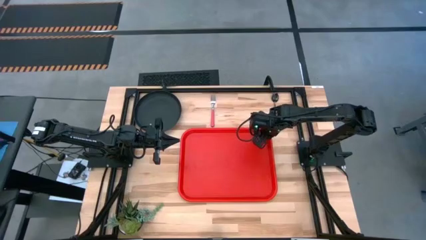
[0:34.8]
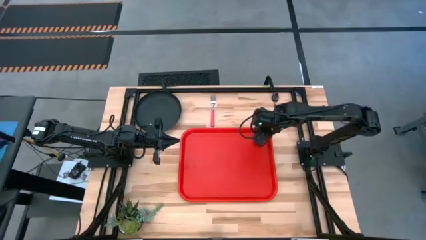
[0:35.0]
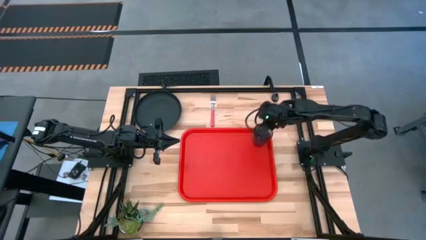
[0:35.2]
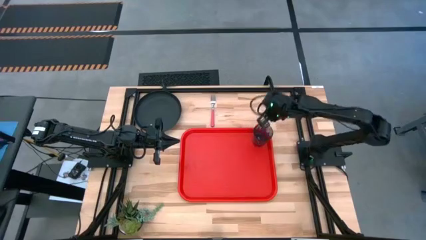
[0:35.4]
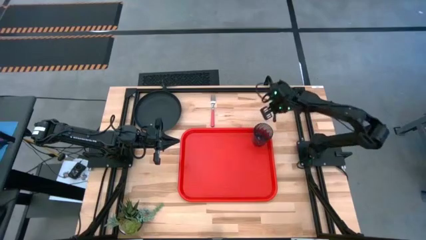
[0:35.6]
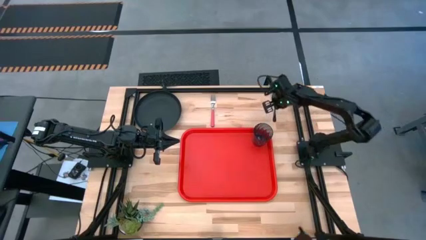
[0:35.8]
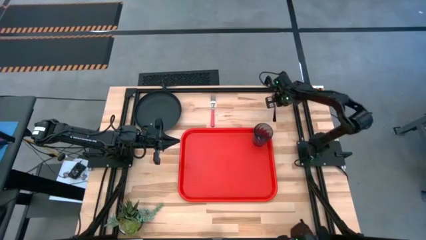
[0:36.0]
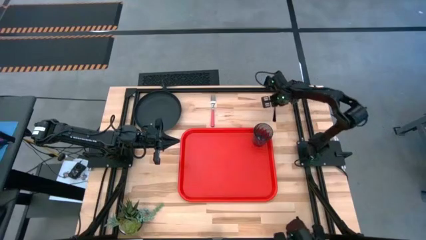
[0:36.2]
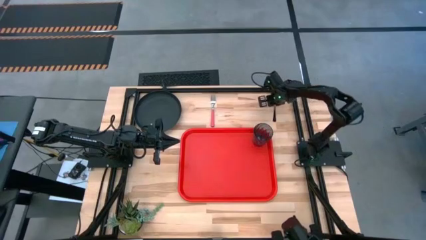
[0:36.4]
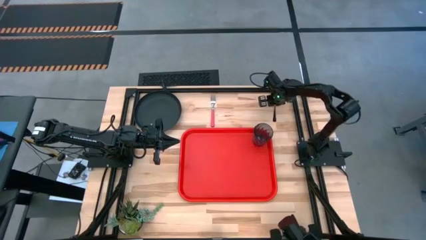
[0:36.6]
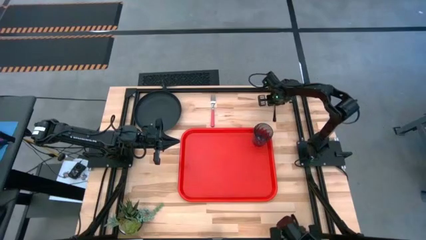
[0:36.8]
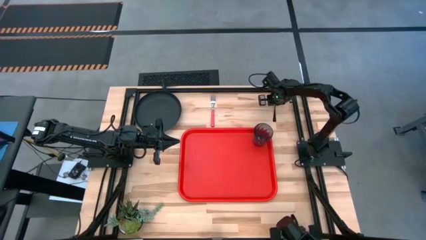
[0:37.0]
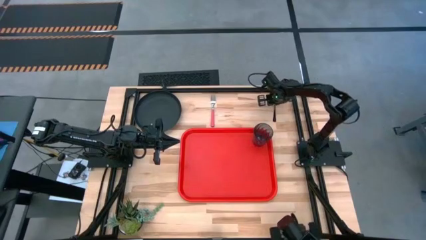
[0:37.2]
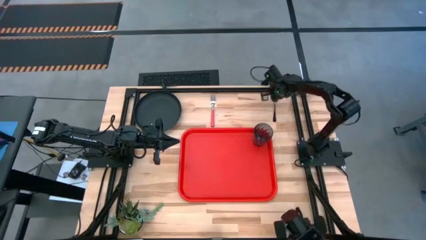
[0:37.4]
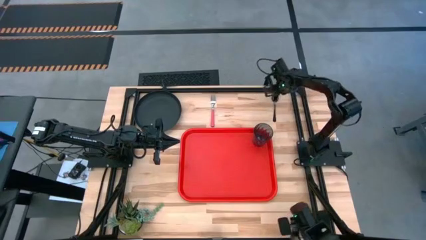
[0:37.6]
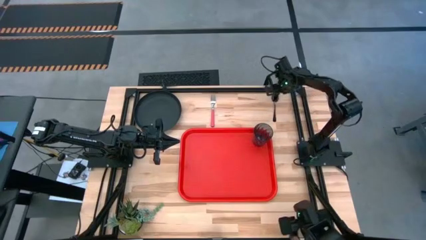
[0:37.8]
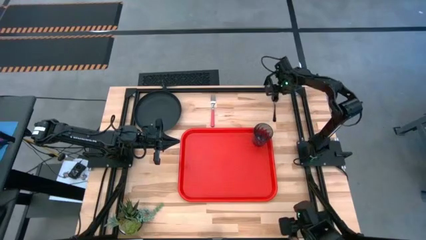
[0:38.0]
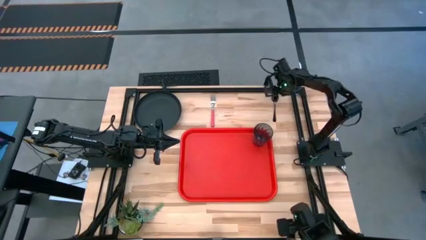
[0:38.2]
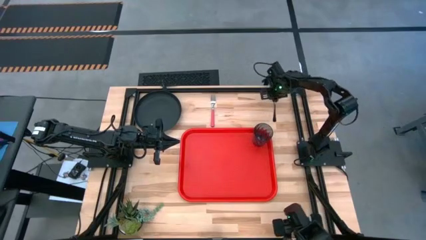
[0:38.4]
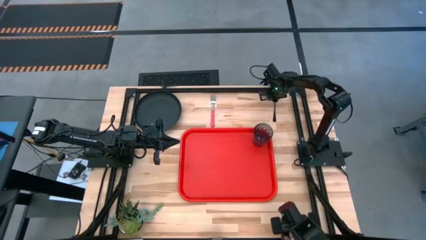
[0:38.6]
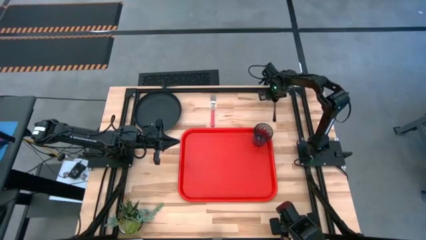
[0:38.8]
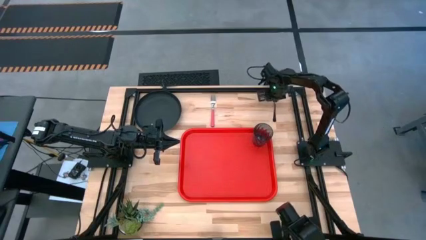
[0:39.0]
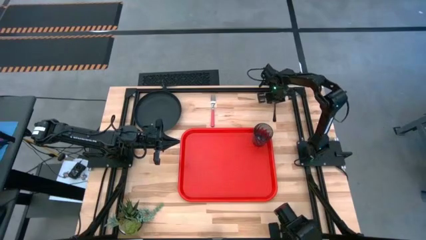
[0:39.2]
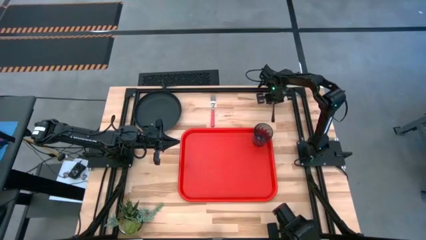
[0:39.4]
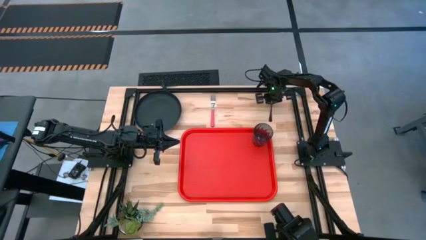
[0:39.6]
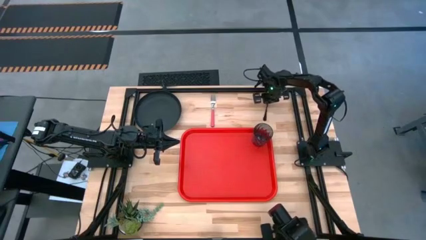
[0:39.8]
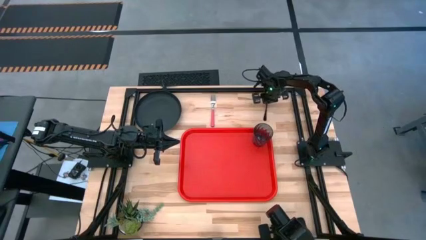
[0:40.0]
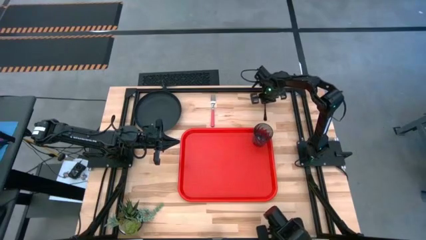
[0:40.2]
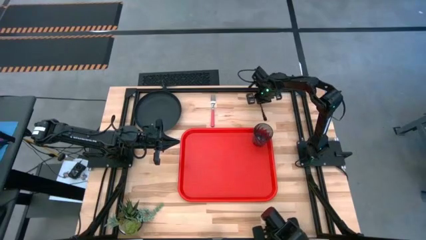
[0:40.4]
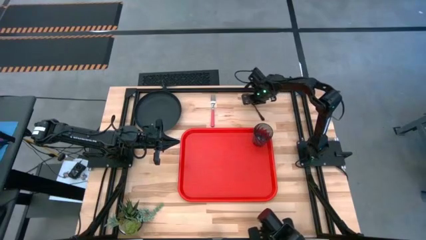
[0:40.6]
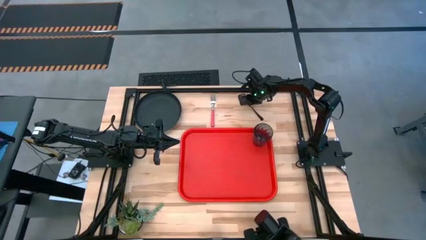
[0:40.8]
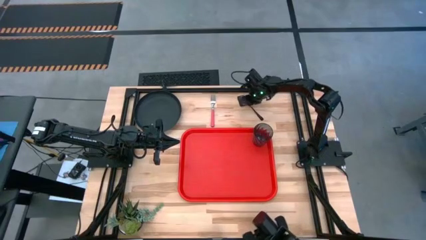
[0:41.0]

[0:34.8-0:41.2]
Task: Pick and place plate/cup/fork/spoon on tray
Put the black spoon to the left of the red serving tray

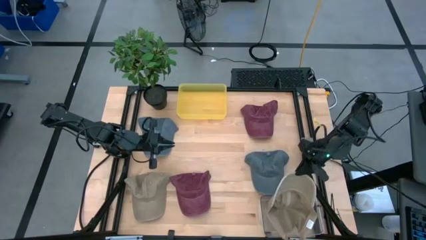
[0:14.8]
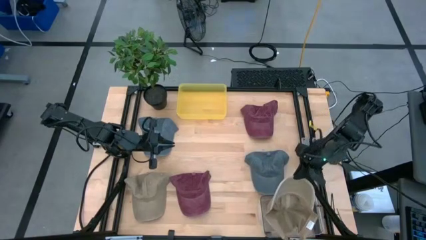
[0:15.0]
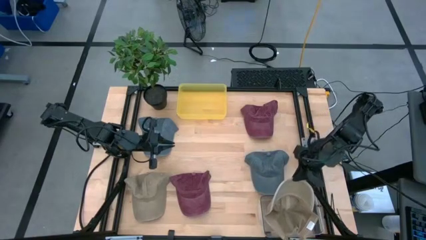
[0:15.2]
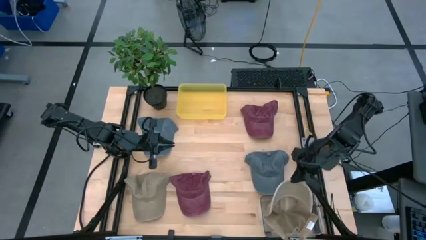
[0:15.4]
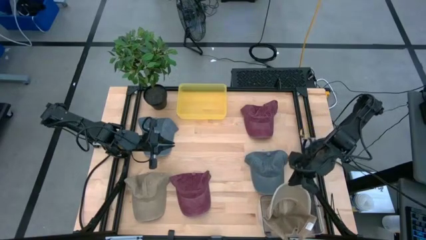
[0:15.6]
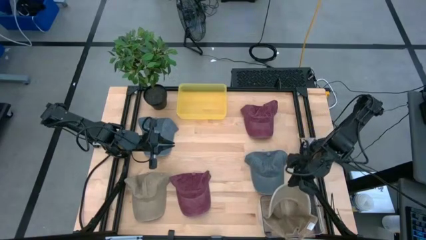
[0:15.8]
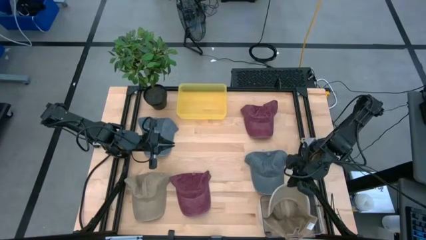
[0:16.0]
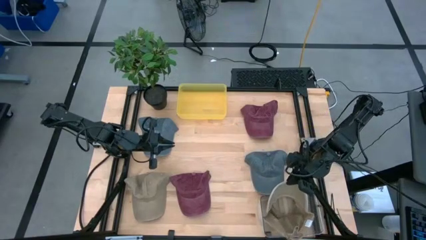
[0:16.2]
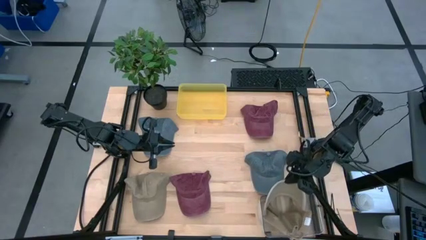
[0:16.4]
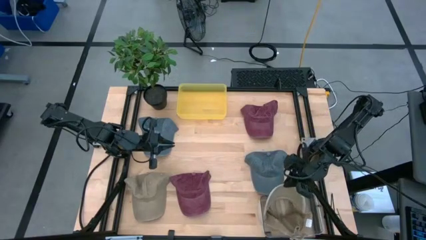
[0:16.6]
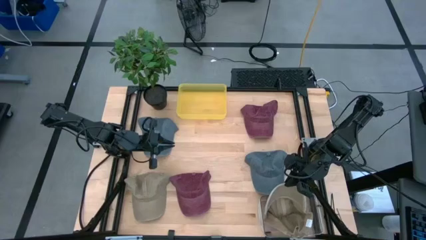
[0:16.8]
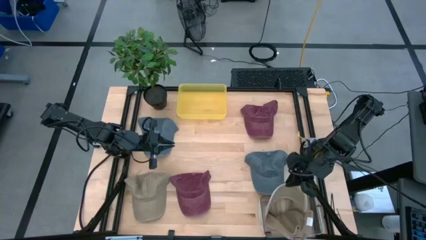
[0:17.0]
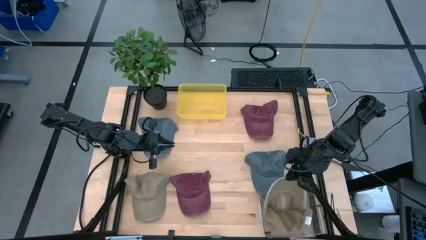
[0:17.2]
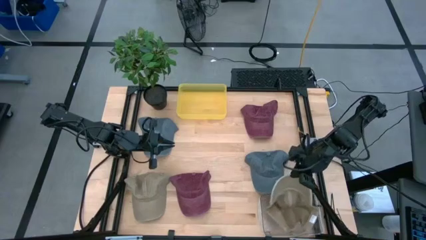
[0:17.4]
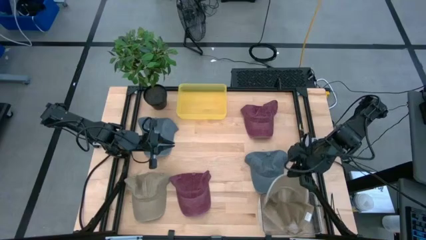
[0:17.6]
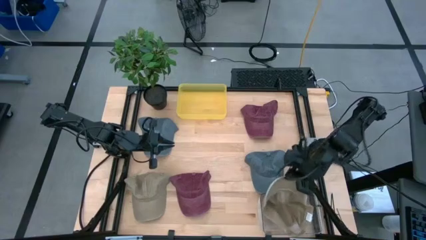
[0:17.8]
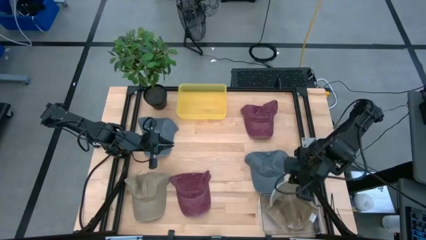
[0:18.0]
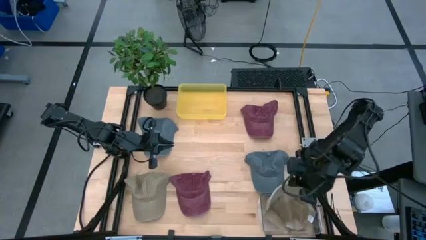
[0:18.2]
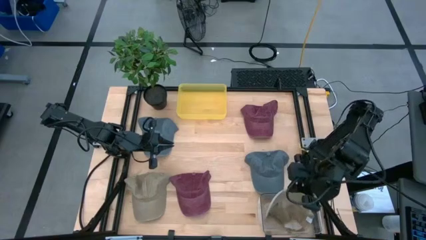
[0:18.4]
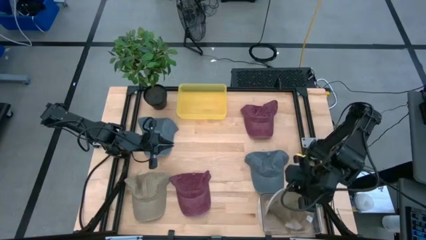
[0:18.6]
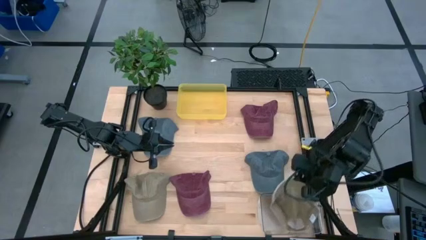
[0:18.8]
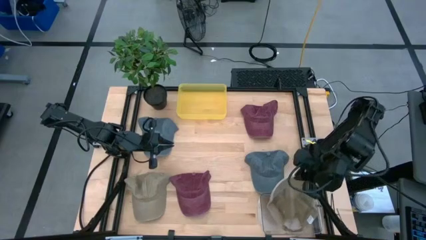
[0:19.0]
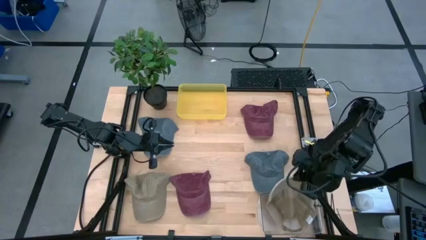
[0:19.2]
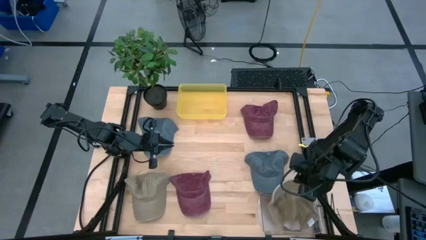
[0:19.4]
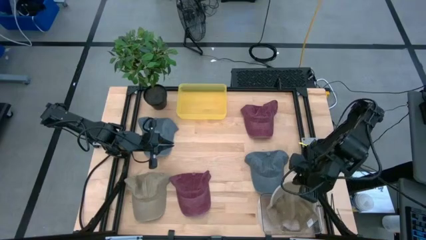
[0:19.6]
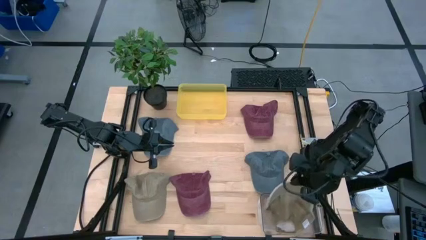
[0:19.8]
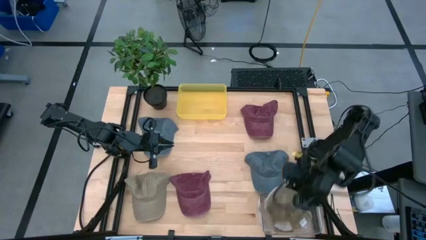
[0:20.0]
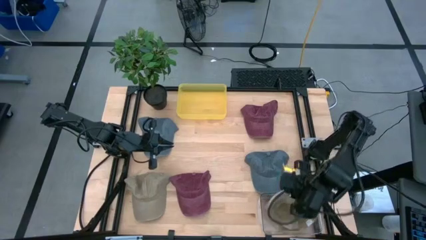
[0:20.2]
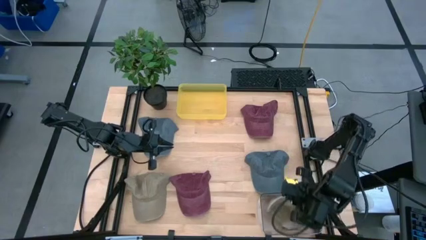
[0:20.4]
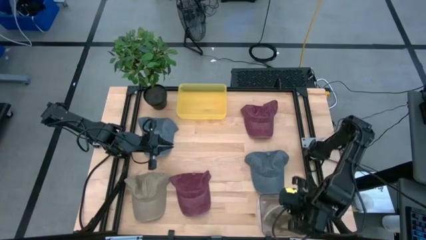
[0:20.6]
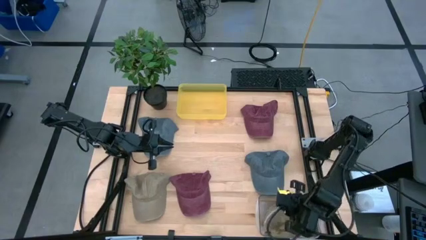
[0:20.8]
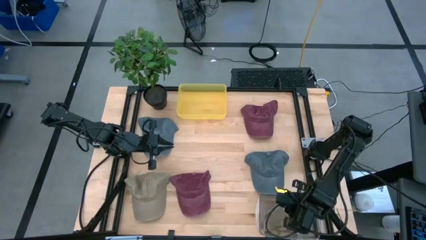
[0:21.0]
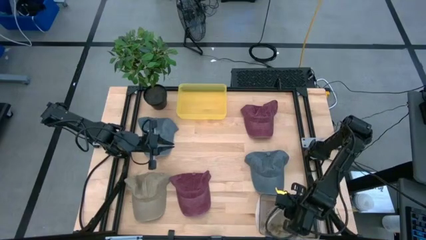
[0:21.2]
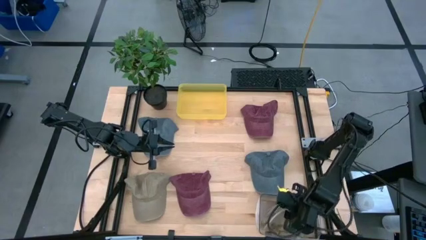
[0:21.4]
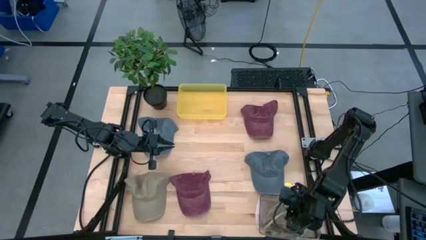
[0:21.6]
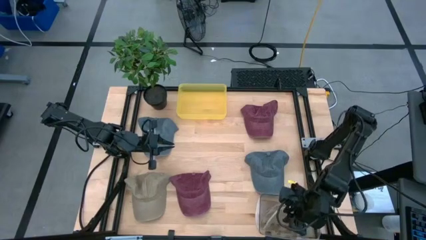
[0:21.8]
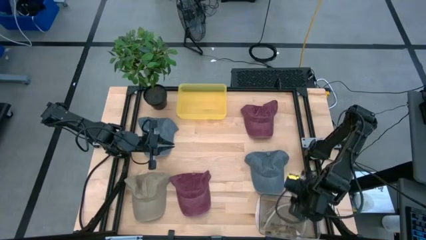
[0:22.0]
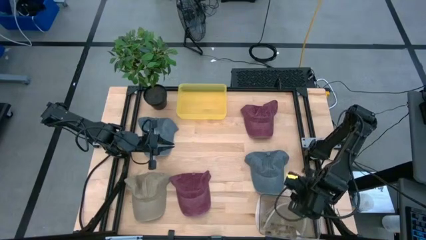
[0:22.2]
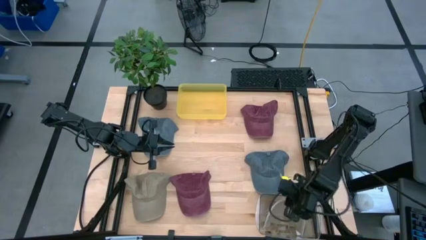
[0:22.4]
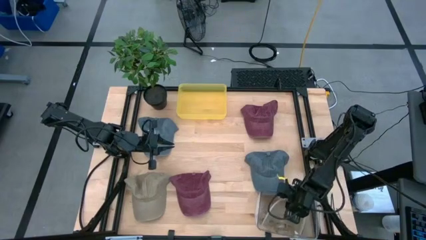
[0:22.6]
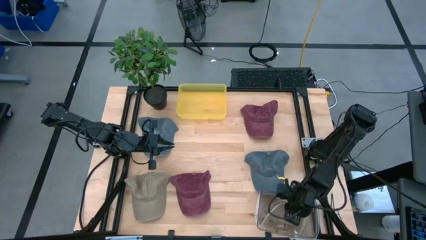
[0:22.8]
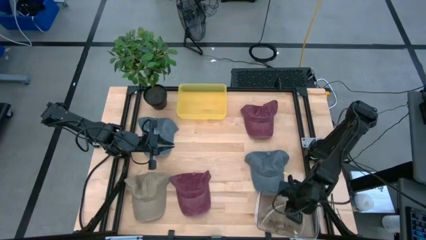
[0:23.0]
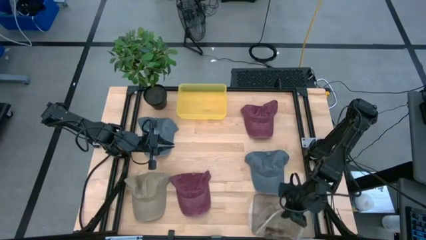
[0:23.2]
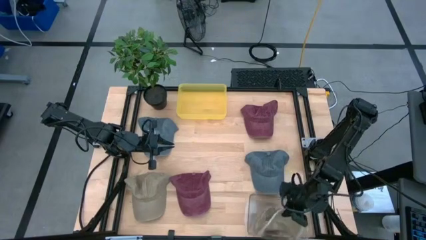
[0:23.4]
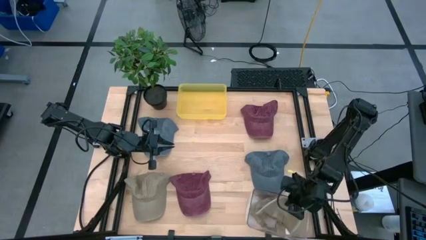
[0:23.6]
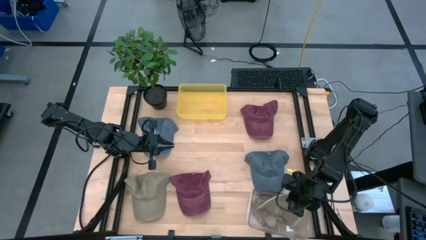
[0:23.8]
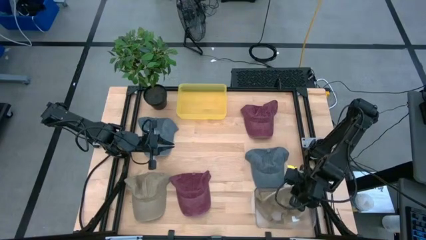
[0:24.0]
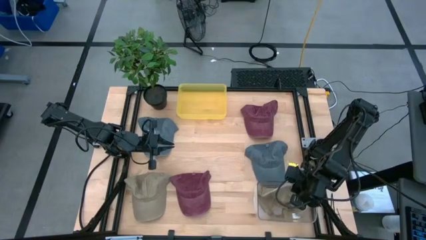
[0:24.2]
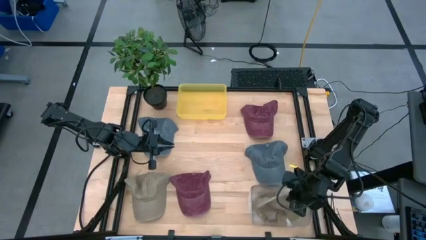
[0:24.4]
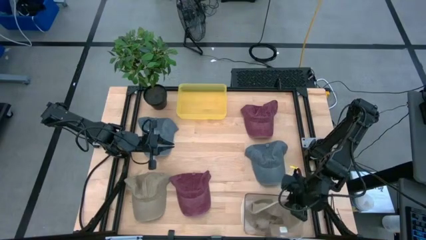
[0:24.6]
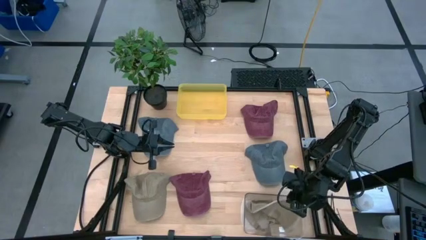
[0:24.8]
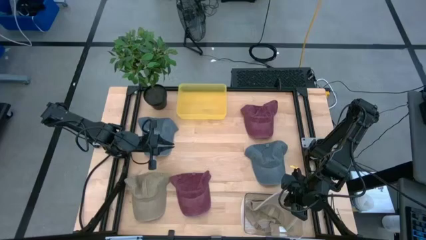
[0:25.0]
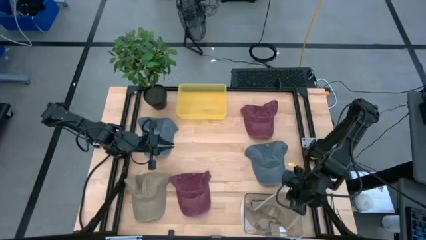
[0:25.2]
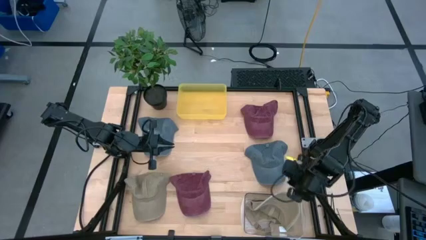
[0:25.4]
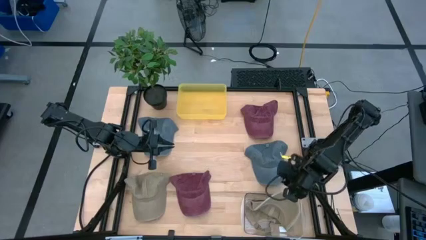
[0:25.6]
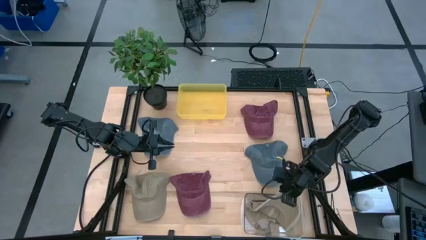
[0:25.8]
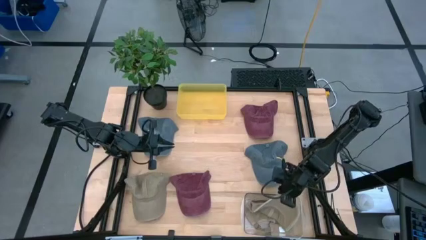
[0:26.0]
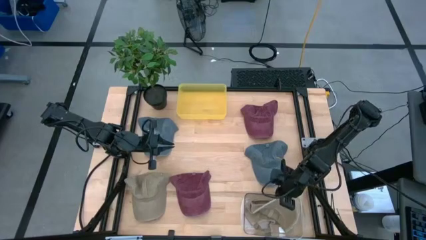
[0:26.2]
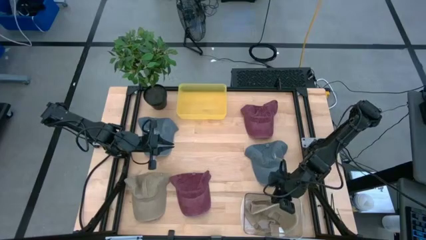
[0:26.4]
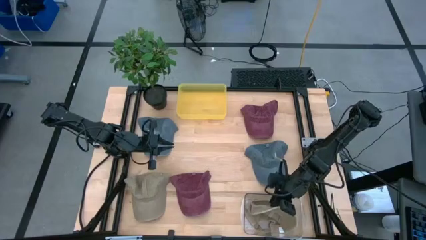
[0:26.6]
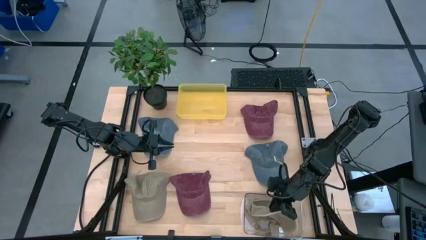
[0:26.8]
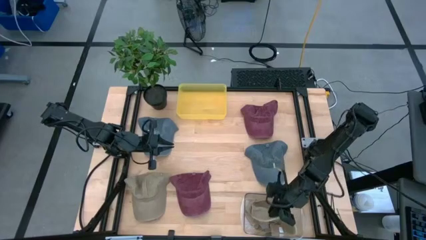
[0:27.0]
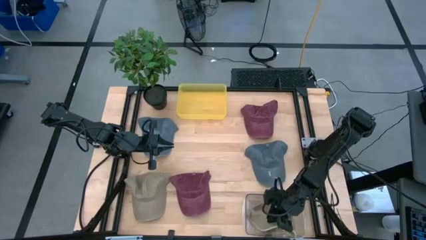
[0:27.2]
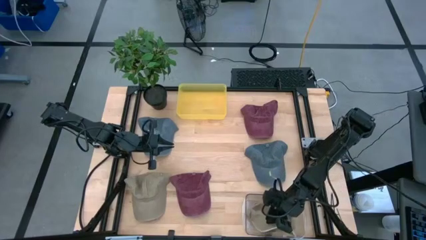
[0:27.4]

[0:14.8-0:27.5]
Task: Pick & Place hat
Put the top brown cap into the transparent bin
